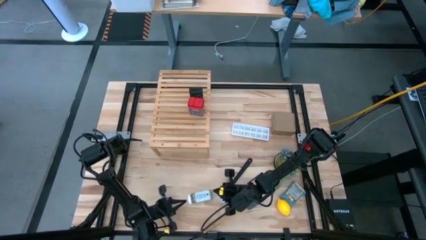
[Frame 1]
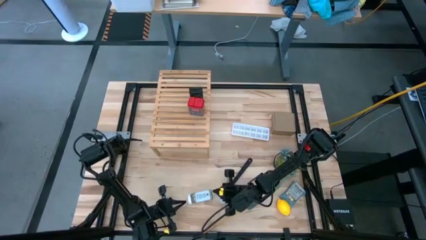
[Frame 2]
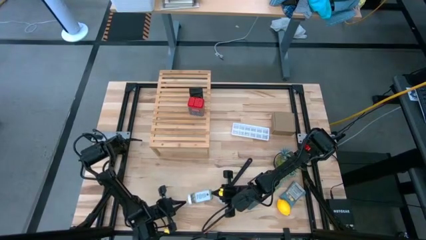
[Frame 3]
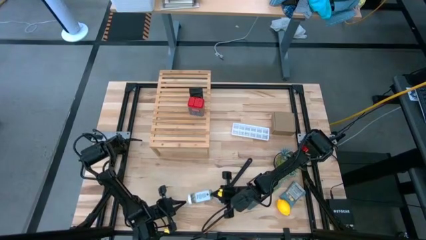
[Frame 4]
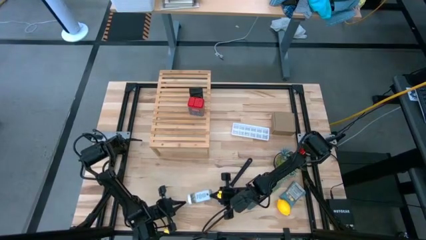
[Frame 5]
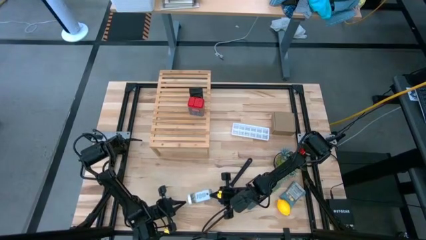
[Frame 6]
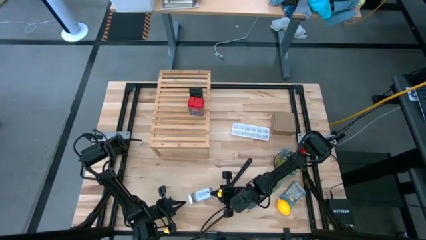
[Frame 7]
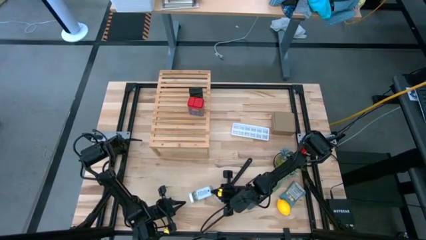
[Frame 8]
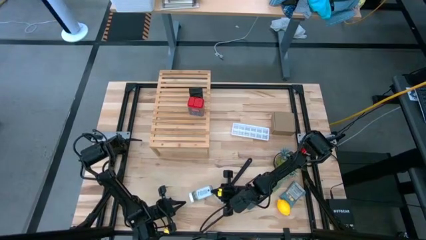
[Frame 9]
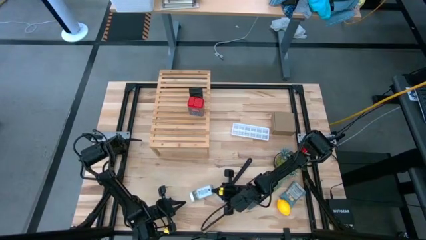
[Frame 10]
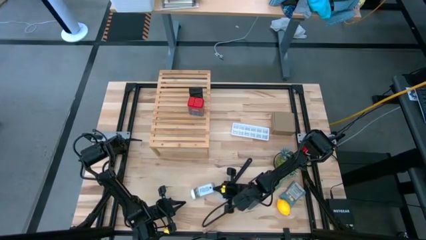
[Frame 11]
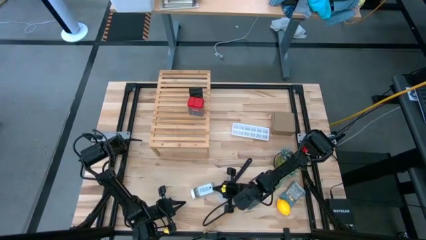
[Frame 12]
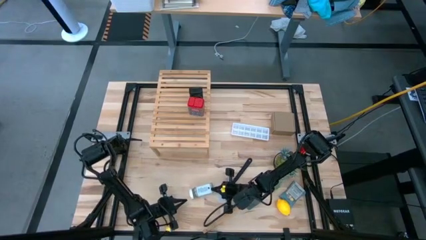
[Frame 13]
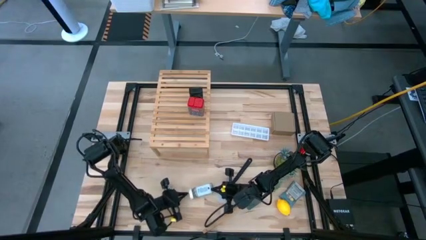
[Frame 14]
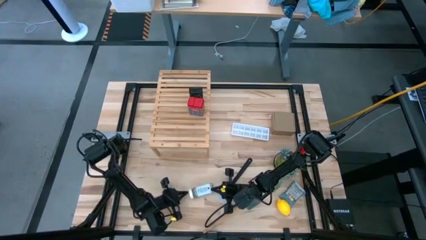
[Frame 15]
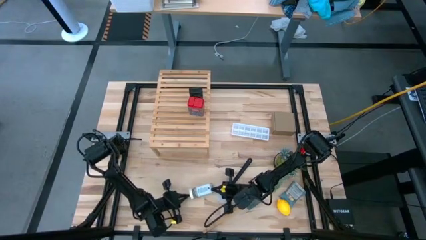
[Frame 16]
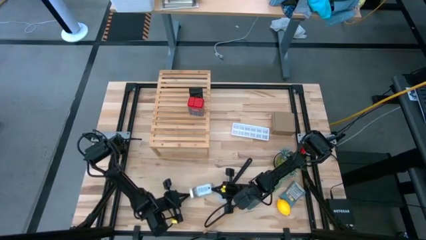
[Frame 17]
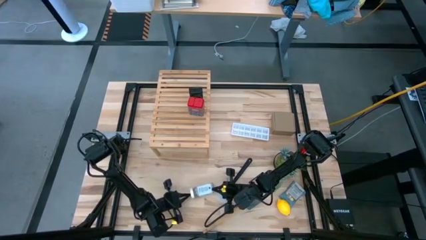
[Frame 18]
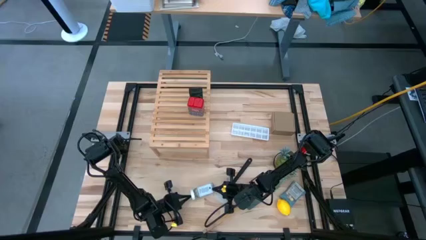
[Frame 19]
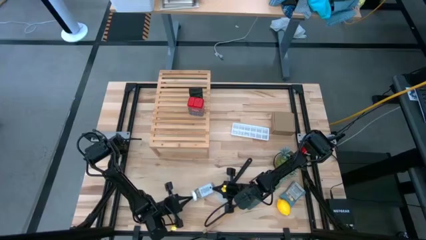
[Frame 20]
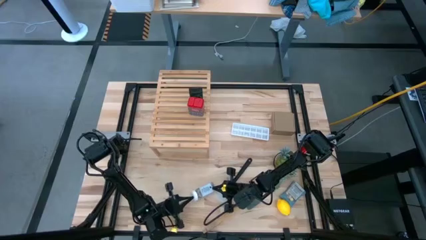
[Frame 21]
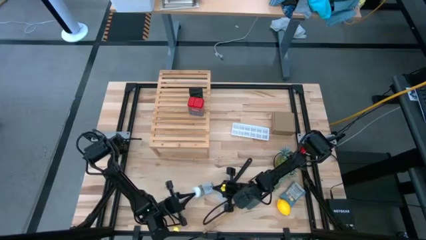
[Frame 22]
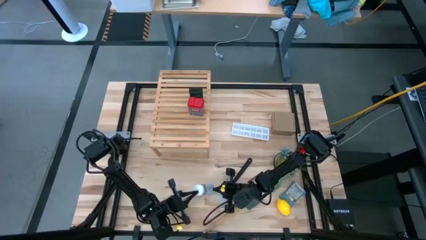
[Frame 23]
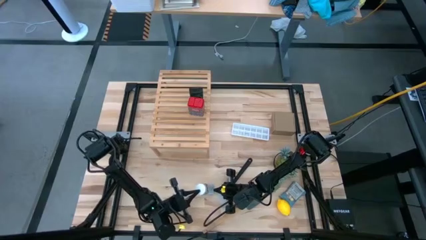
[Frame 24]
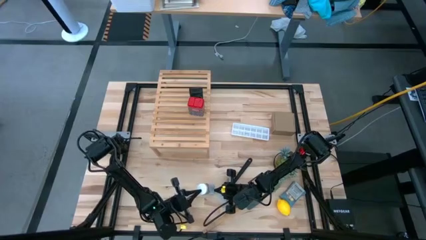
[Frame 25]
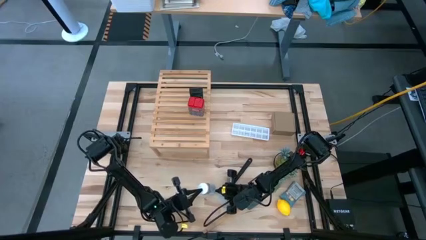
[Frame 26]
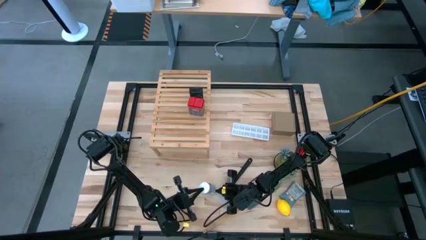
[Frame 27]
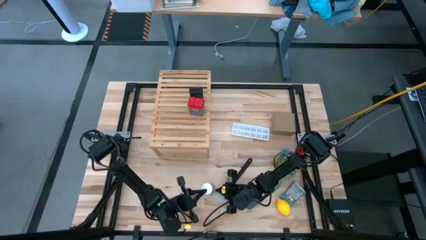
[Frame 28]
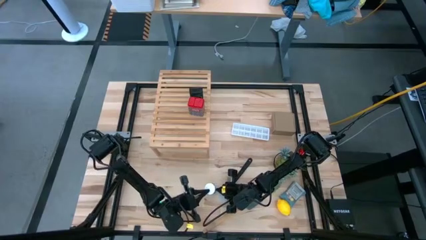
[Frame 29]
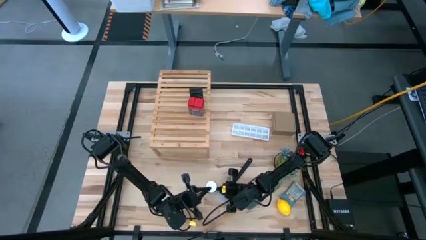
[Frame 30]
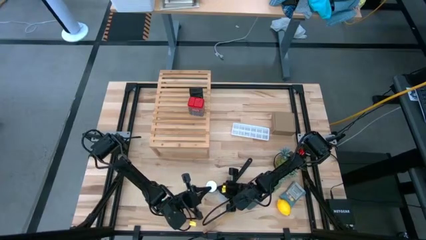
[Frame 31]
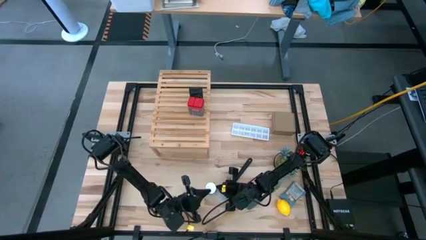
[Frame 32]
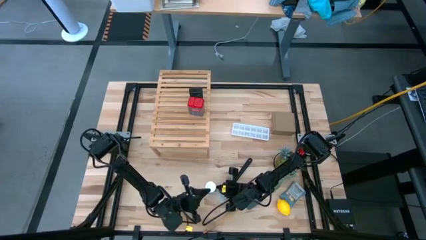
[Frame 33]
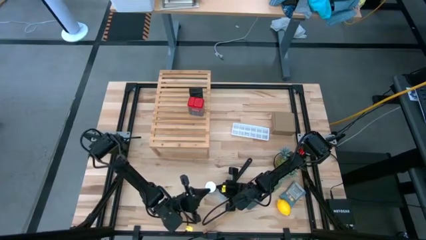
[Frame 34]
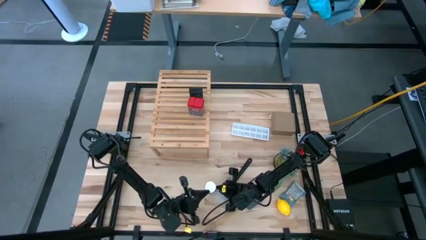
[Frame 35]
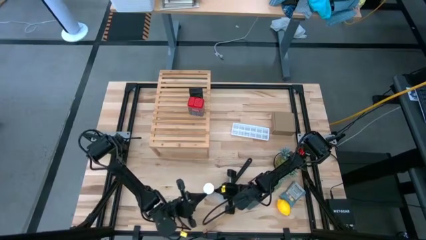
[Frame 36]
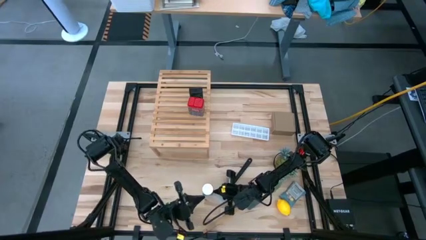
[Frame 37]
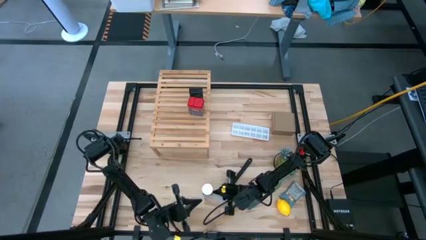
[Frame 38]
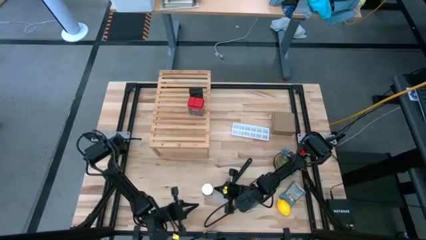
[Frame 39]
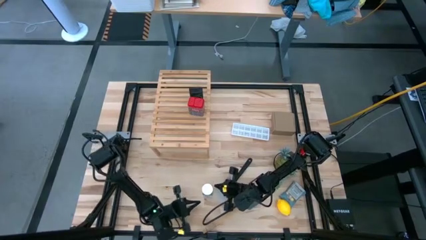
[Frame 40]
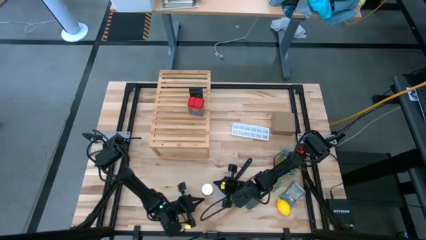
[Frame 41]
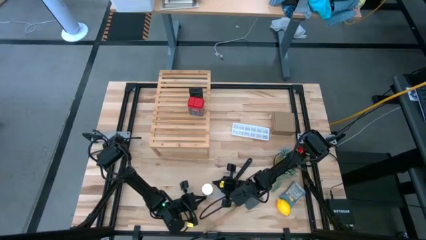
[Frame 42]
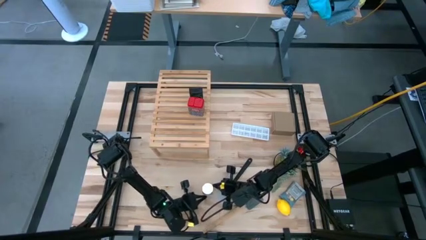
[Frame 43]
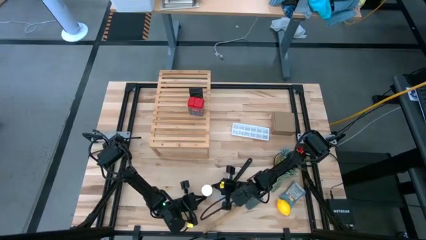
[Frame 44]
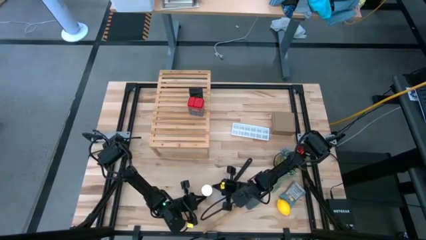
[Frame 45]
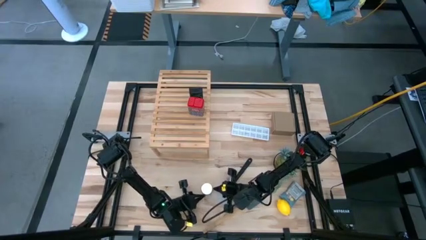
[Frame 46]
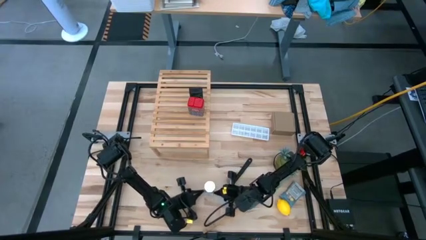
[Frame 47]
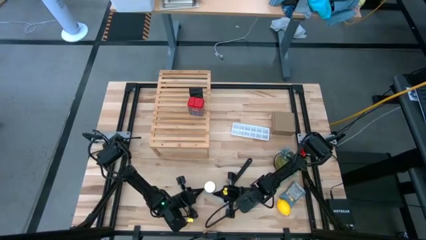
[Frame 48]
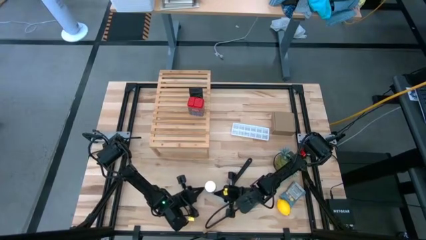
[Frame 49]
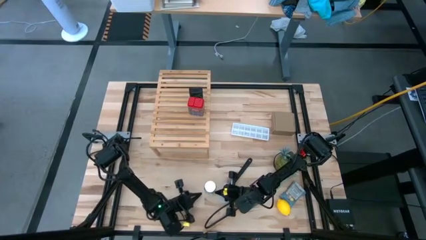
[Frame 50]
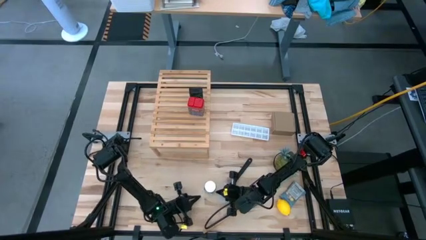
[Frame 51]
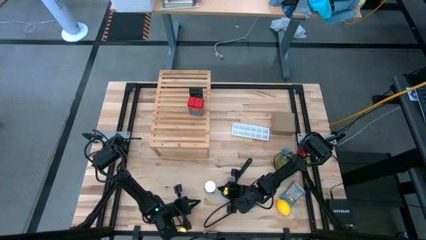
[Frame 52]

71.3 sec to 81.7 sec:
Task: Shelf spices
Put the white seasoning bottle on the shelf

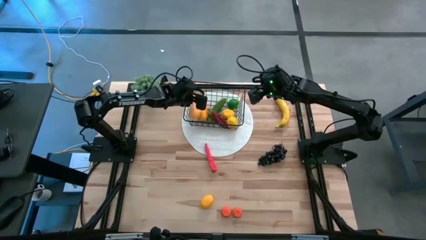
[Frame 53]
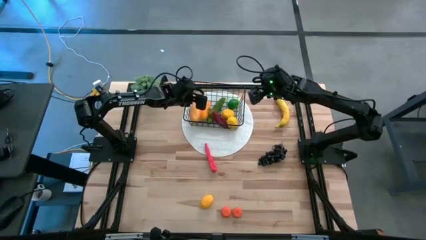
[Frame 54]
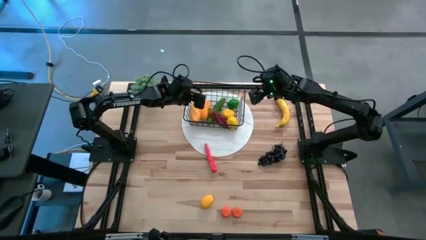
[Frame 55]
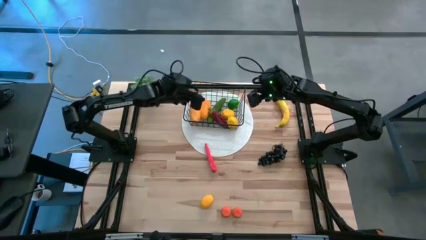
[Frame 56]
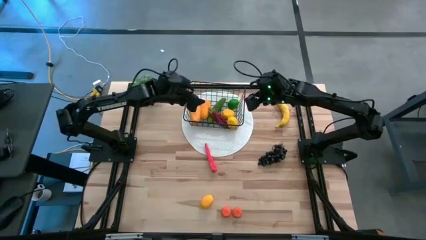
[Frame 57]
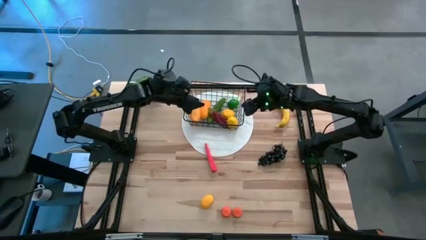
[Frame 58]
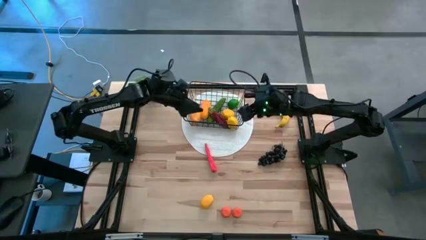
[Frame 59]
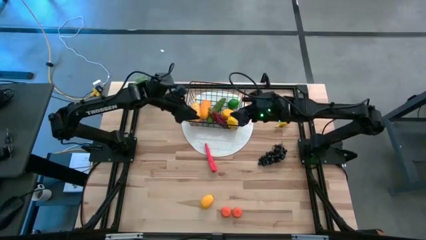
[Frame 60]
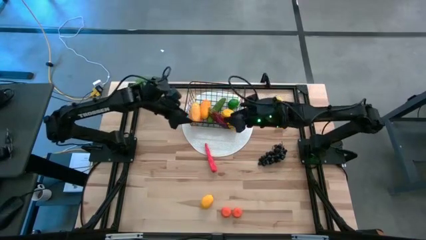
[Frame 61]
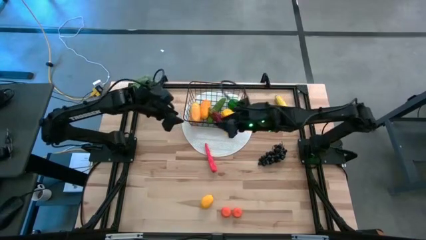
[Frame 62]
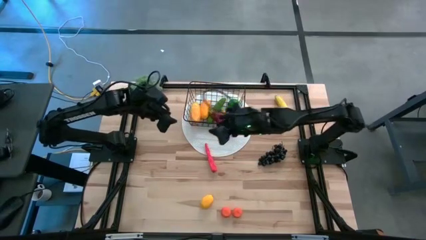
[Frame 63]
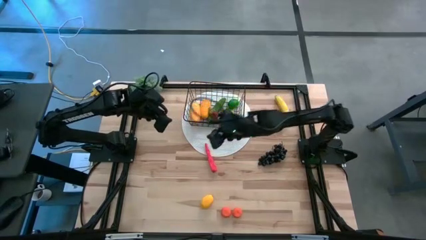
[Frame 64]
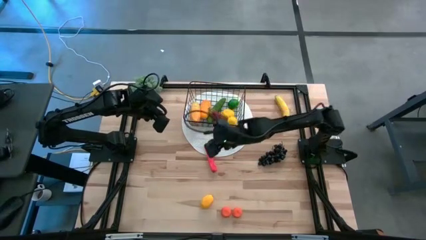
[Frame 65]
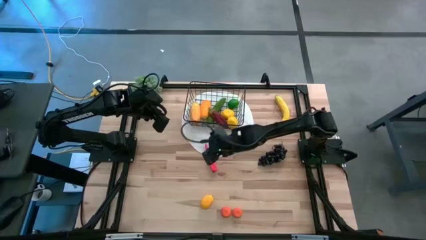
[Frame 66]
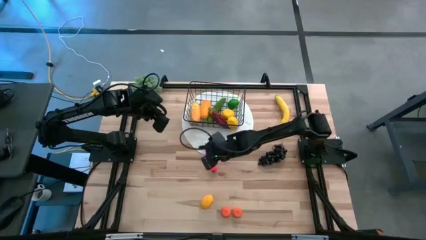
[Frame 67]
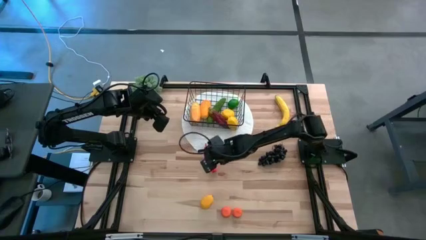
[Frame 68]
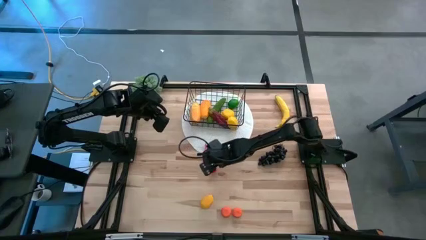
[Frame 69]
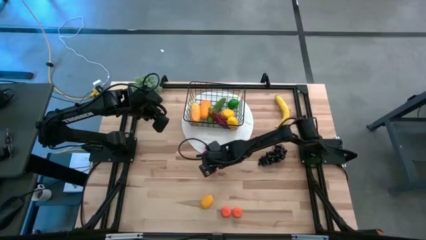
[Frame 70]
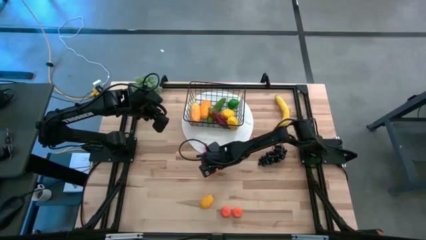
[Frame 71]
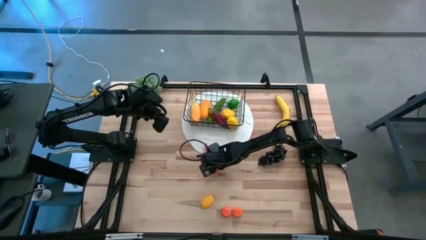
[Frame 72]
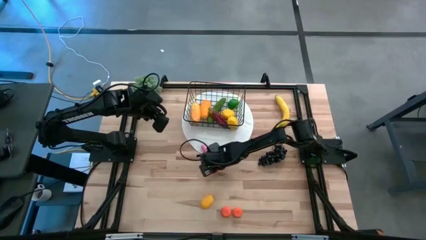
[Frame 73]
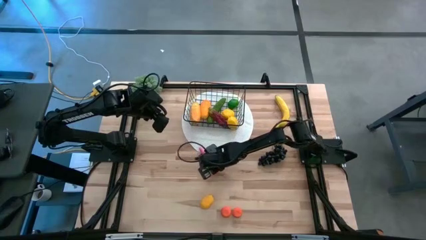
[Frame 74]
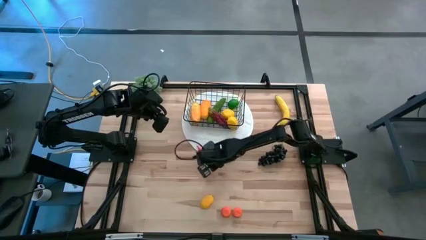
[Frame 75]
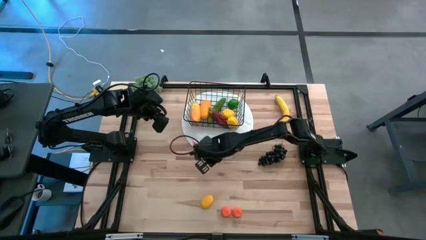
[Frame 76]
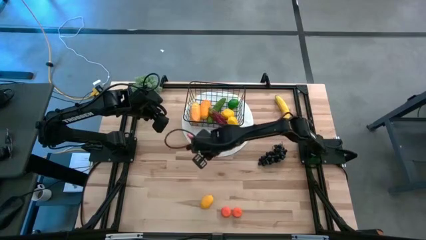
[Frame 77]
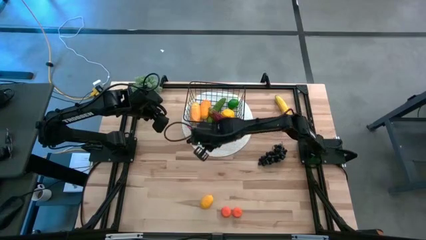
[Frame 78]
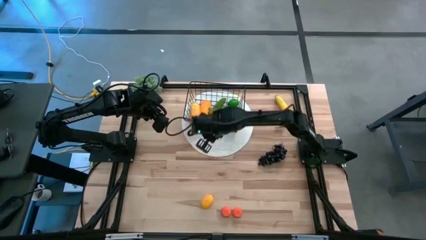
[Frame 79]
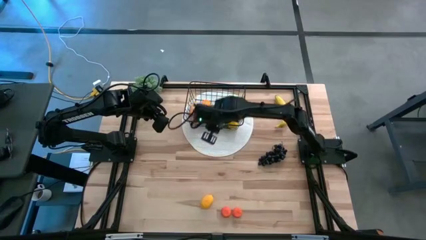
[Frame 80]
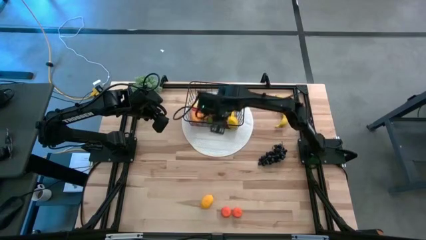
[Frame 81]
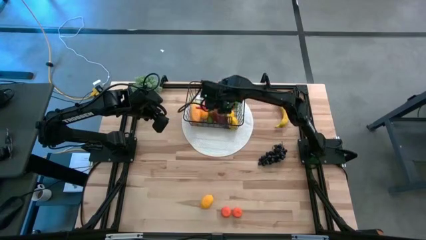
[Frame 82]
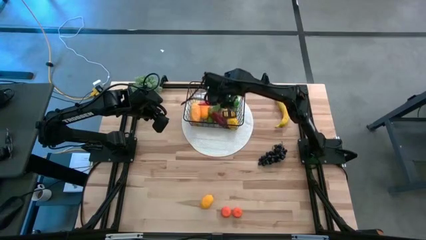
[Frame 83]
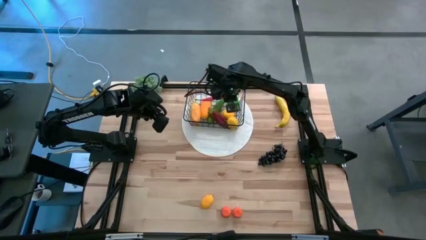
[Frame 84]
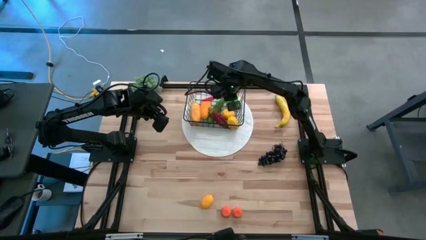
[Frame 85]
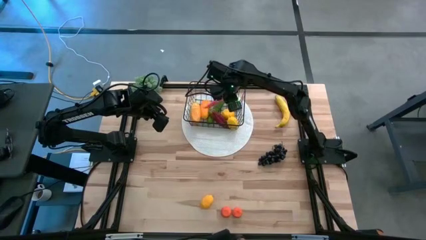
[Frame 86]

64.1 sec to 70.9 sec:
Task: Build produce basket
Put the carrot into the wire basket
